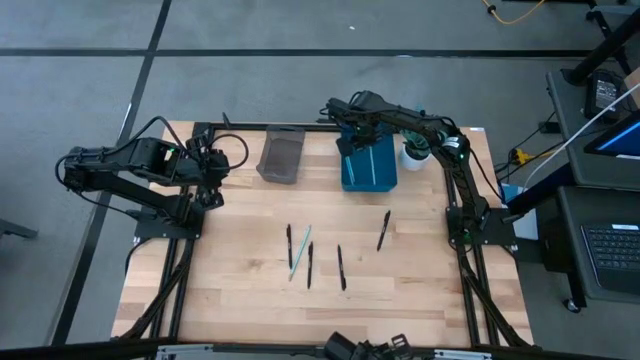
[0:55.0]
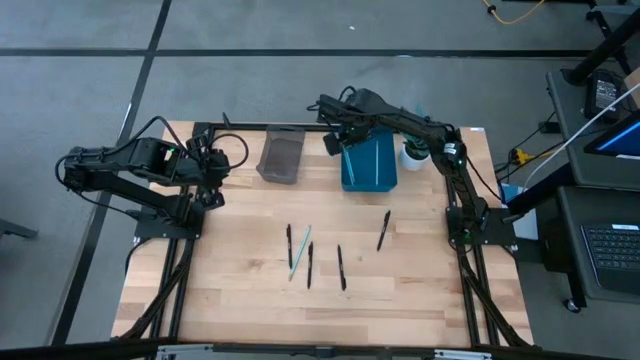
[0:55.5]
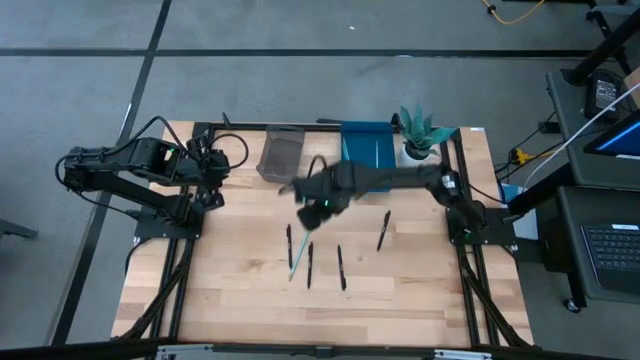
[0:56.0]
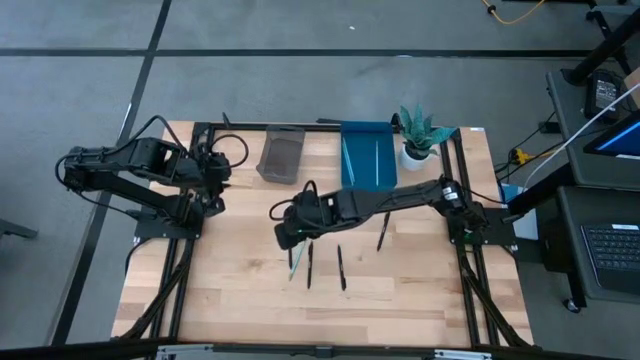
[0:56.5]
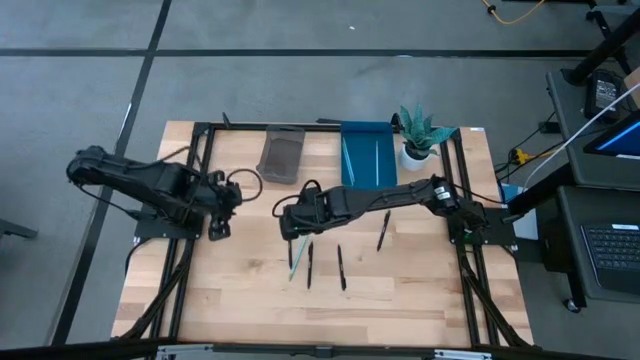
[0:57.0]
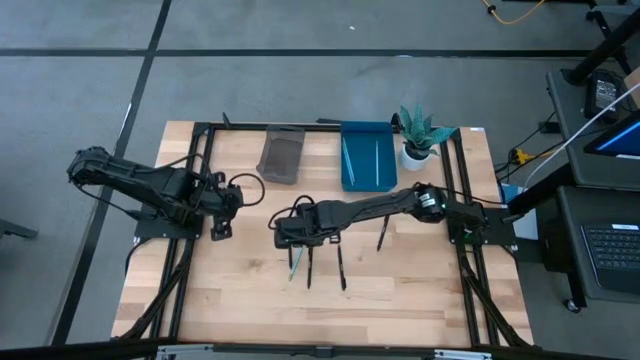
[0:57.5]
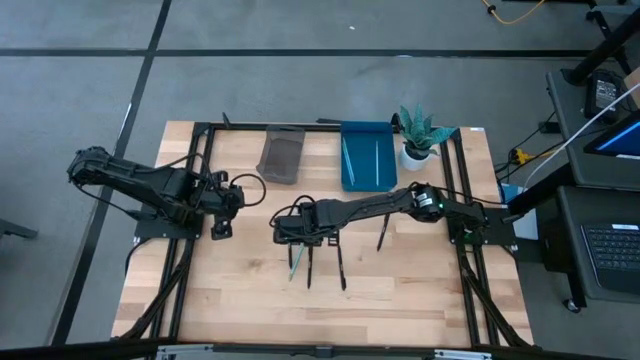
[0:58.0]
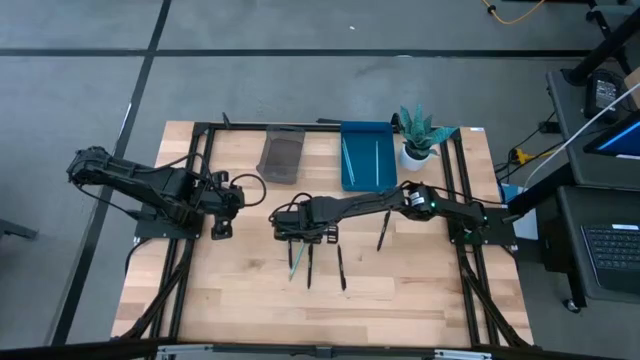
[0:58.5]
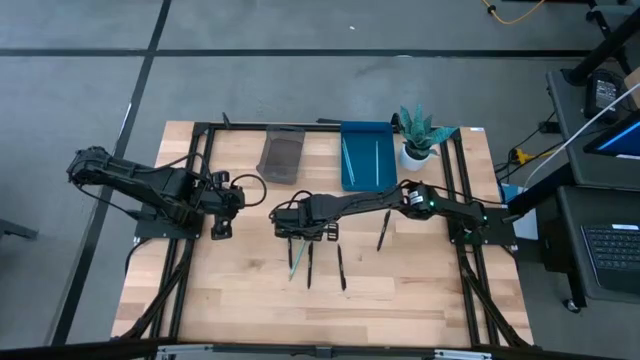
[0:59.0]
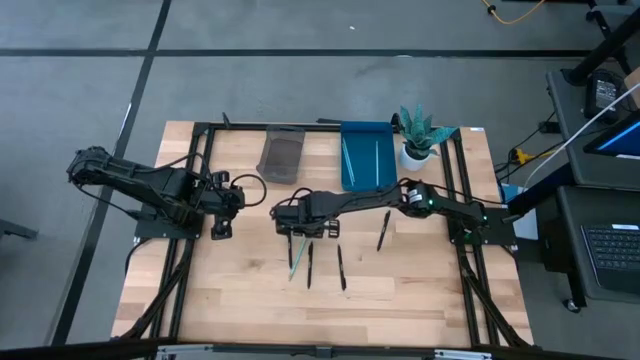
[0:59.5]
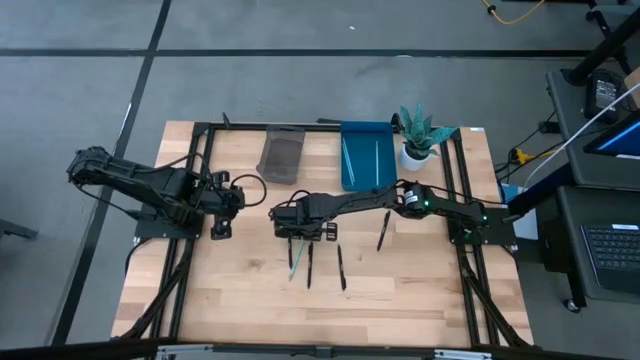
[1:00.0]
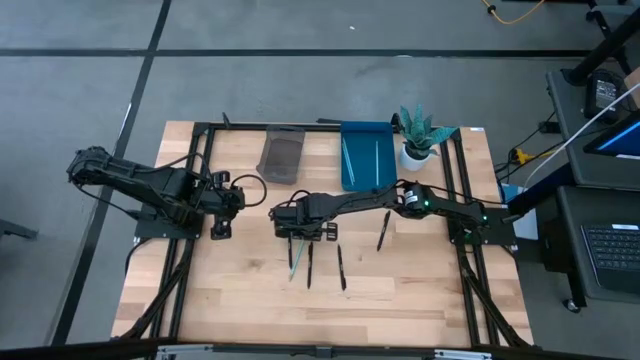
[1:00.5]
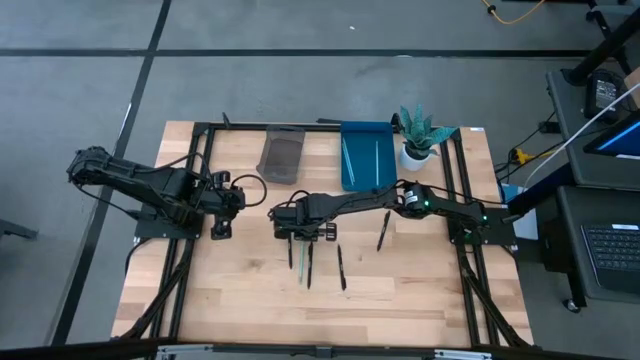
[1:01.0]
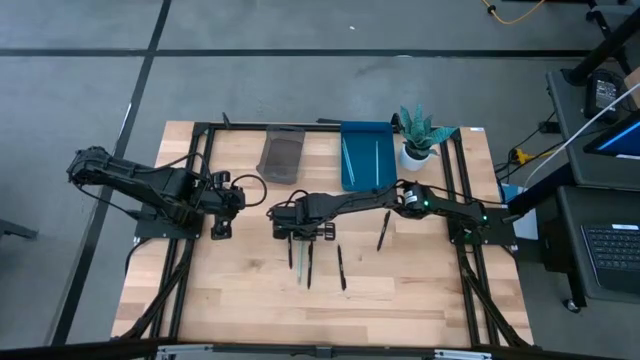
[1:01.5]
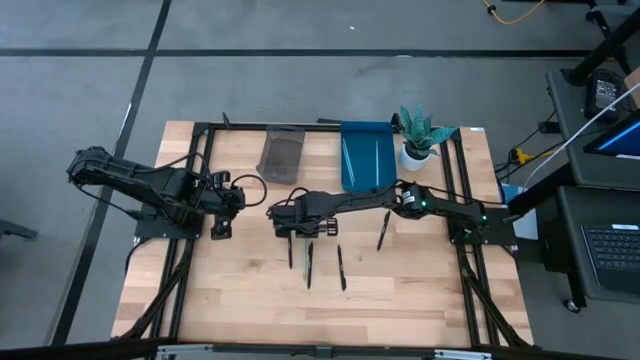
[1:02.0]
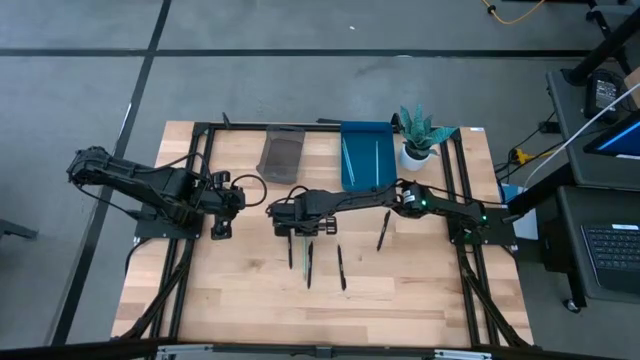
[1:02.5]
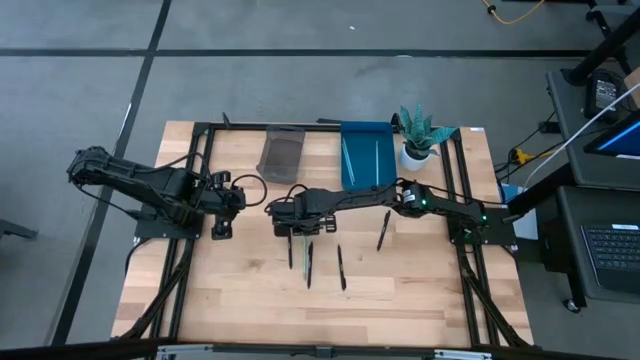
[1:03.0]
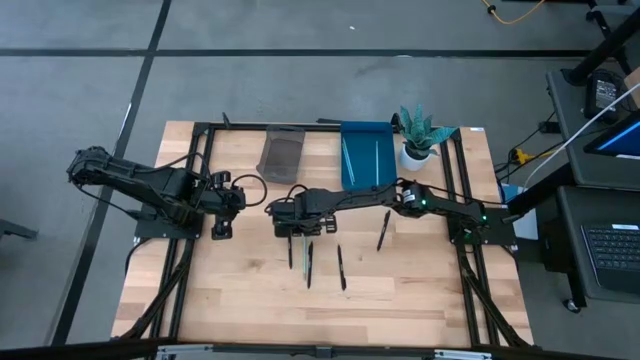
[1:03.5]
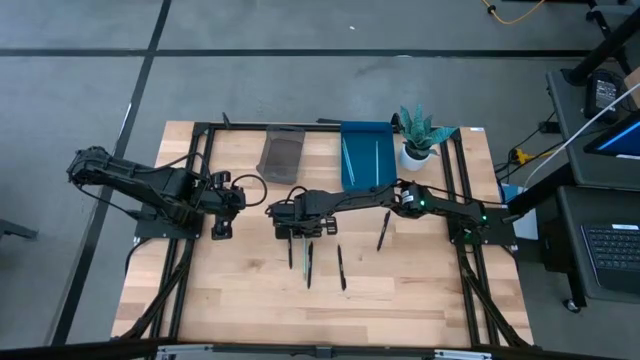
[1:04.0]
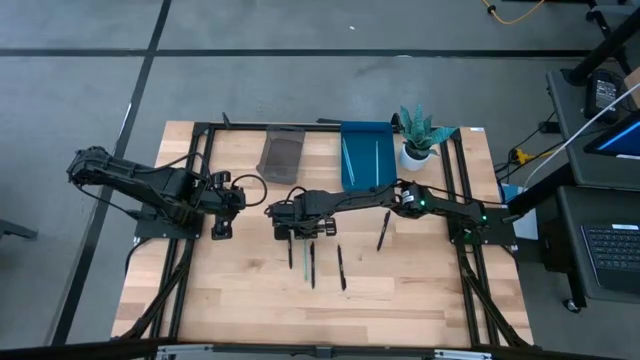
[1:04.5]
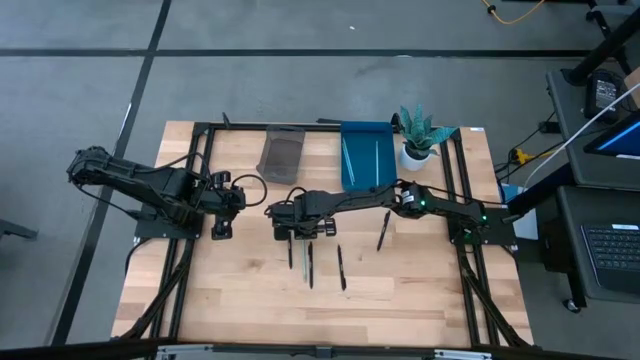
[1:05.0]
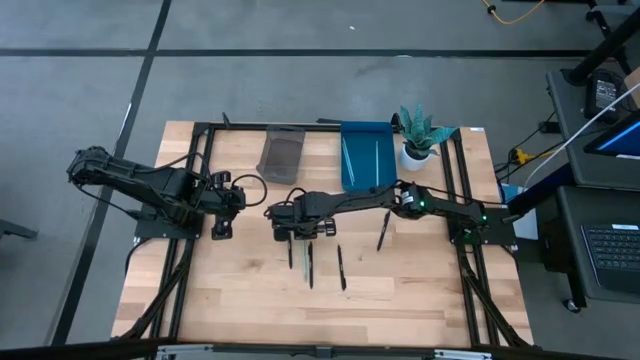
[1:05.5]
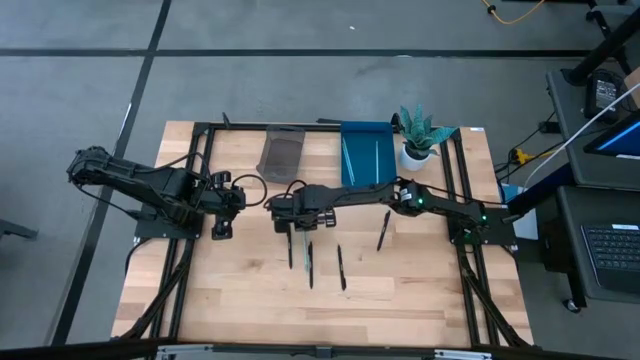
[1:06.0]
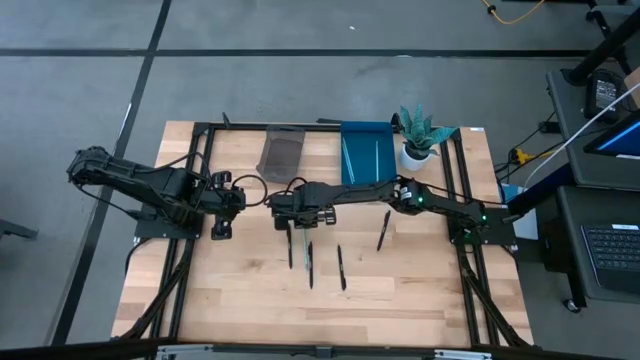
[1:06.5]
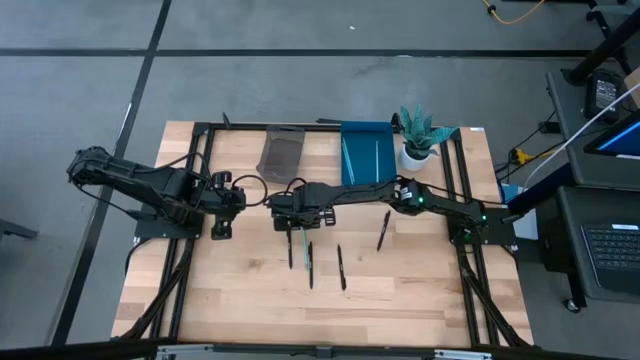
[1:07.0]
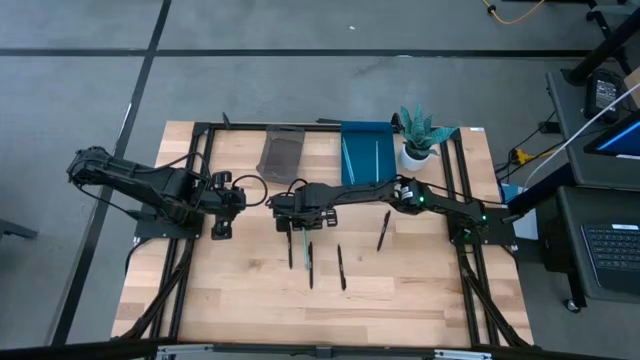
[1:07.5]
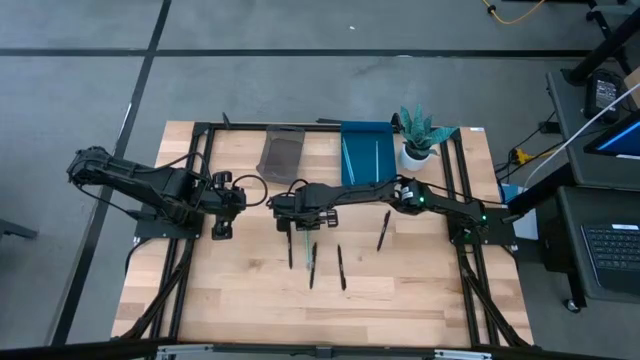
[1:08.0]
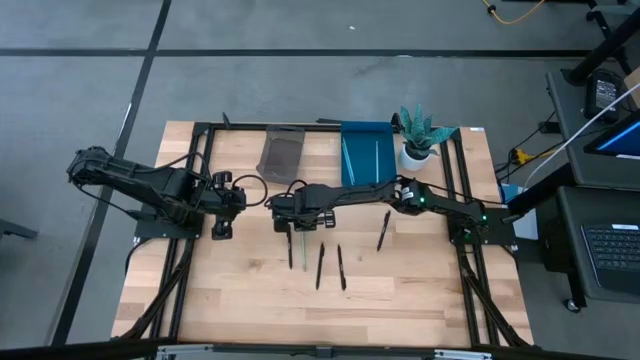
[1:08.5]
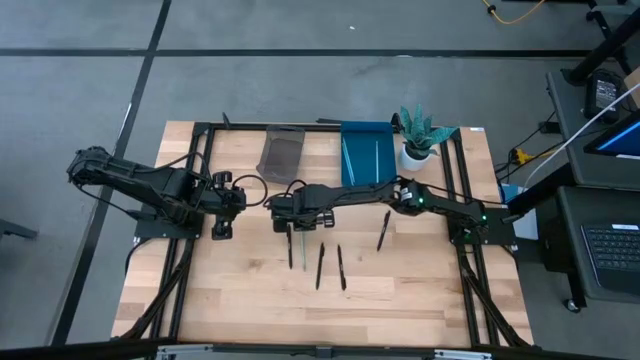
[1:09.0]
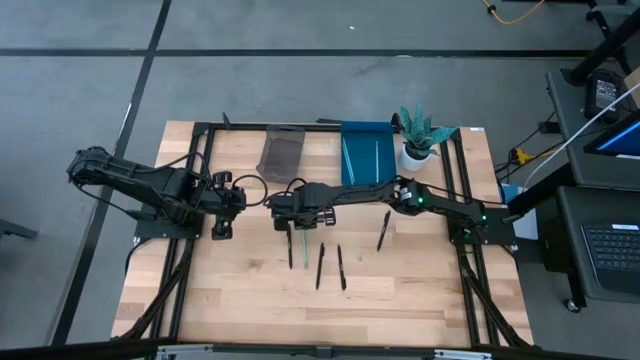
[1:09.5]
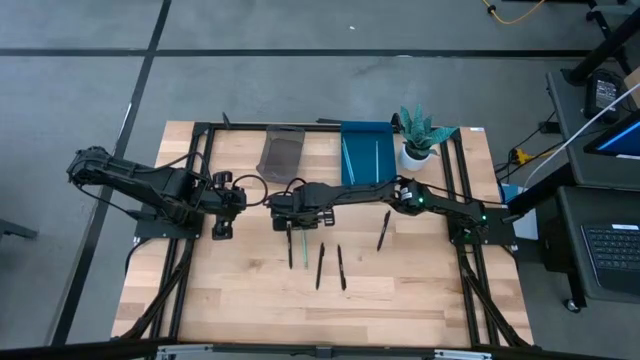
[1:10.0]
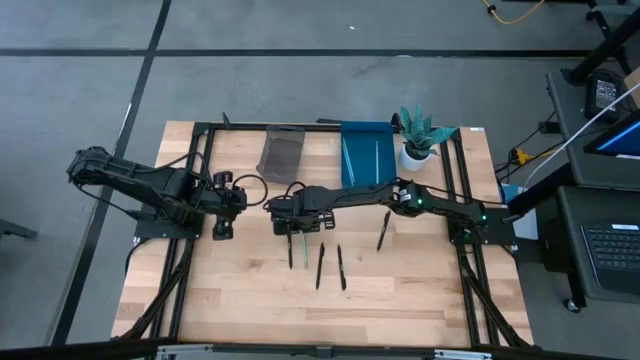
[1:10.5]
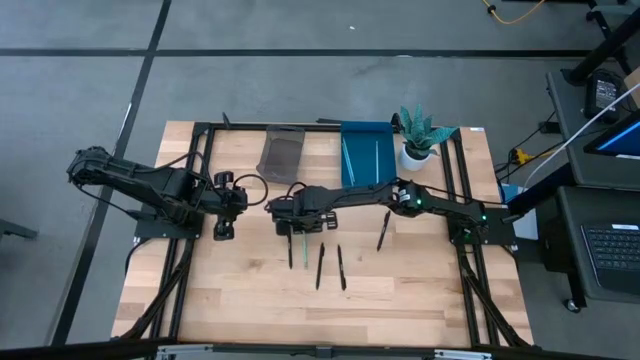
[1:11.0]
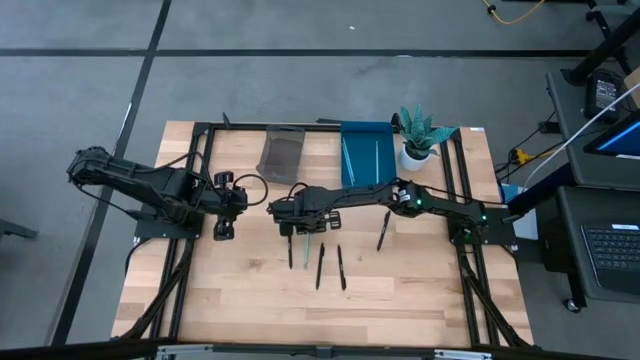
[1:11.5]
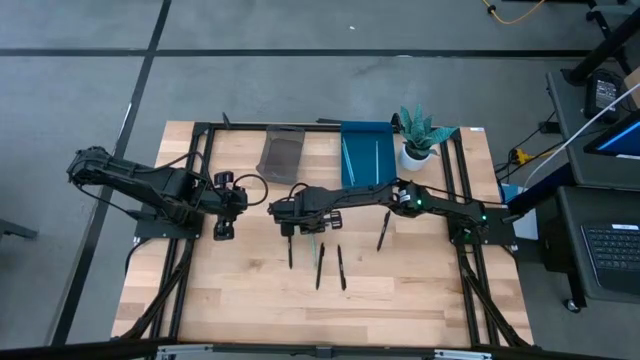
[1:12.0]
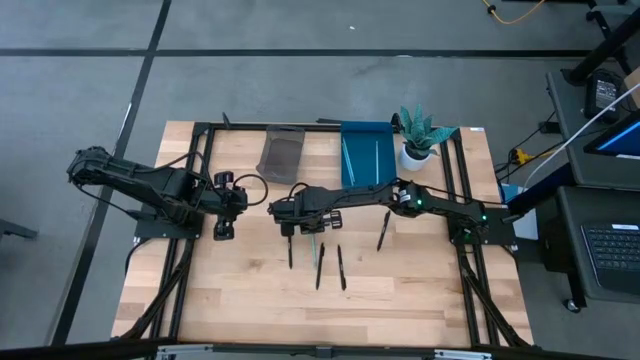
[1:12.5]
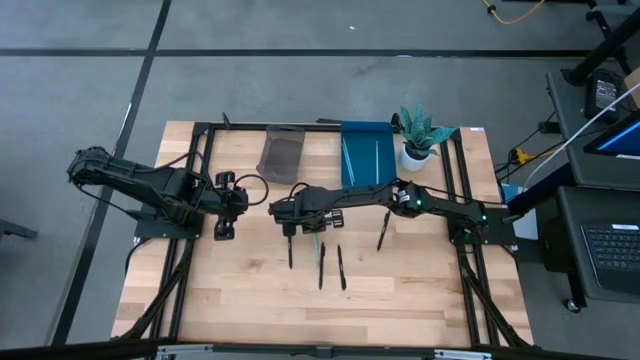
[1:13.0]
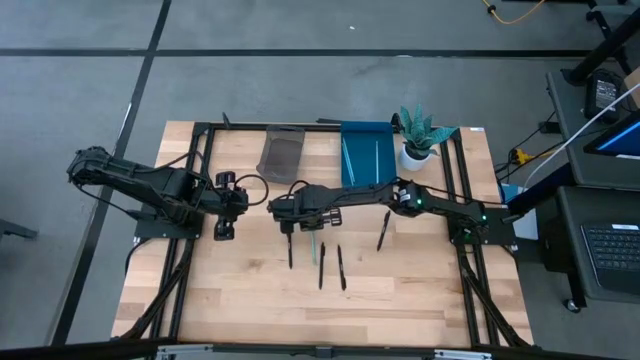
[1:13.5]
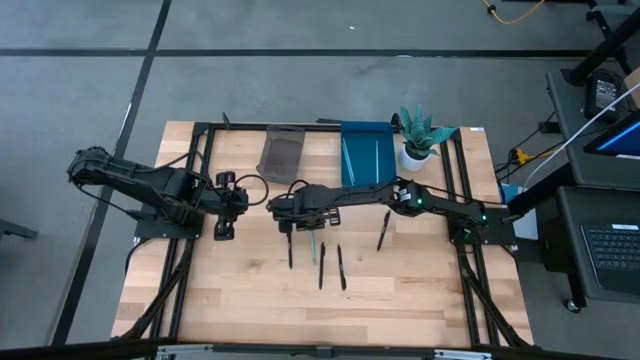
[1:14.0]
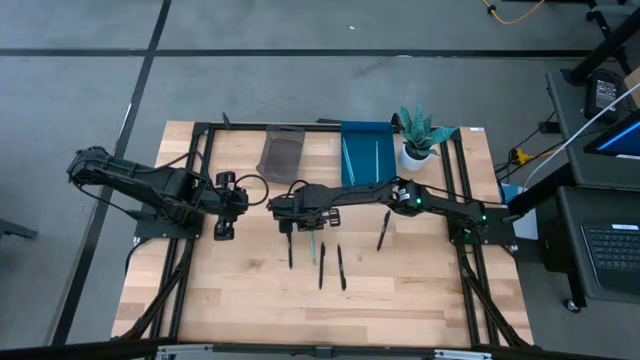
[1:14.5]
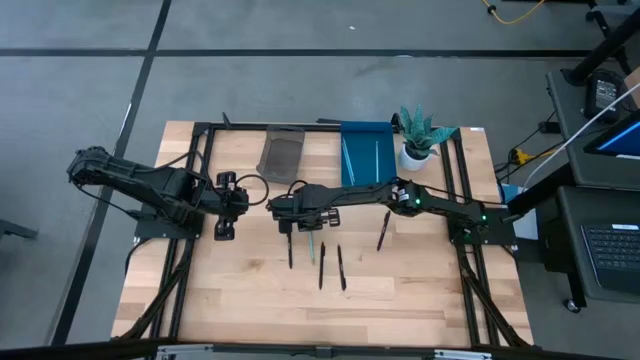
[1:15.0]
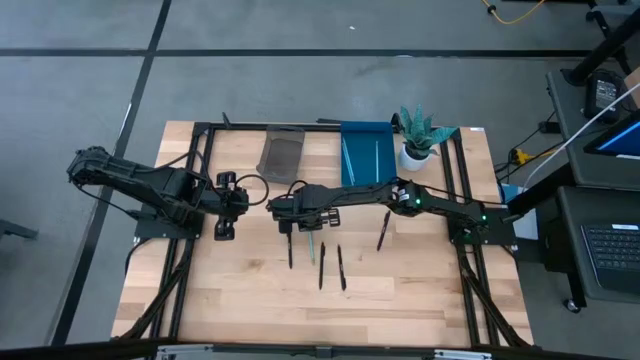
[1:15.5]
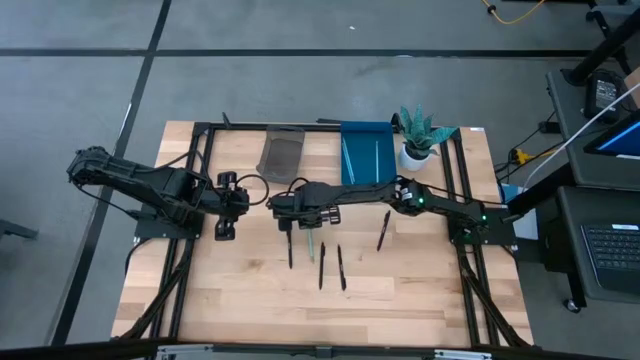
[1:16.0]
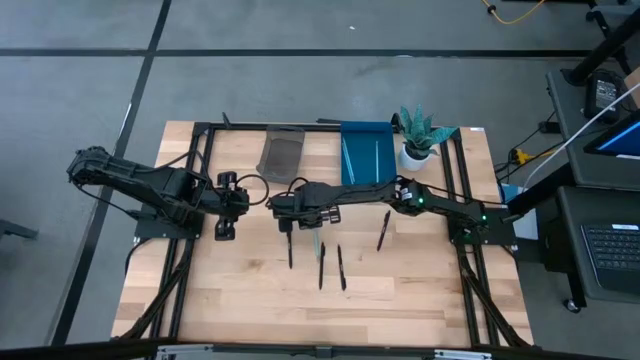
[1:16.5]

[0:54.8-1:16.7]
Task: Sort pens & pencils
Put the light blue pencil into the blue bin
